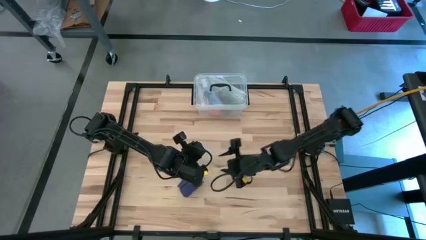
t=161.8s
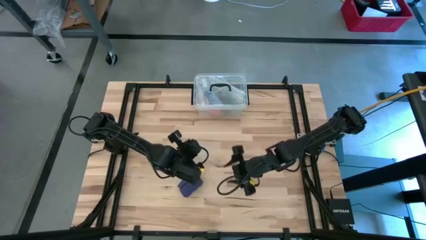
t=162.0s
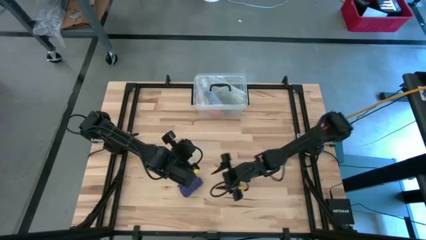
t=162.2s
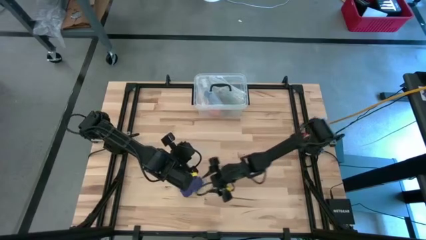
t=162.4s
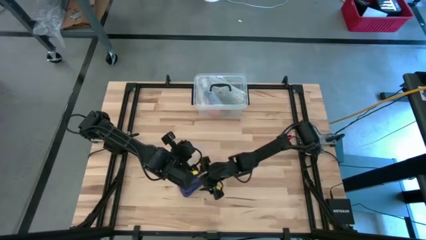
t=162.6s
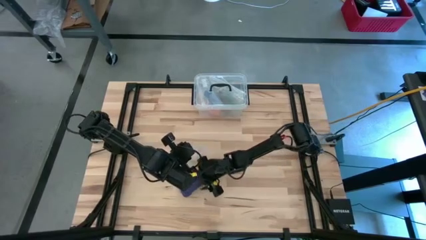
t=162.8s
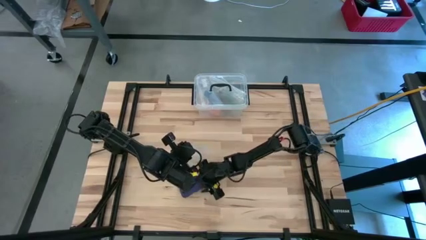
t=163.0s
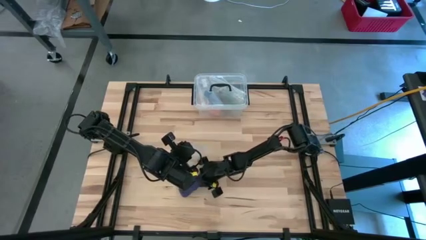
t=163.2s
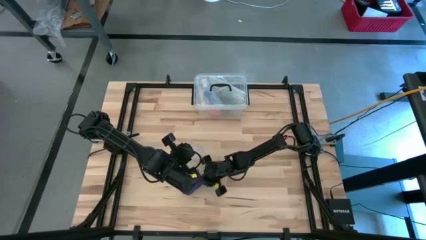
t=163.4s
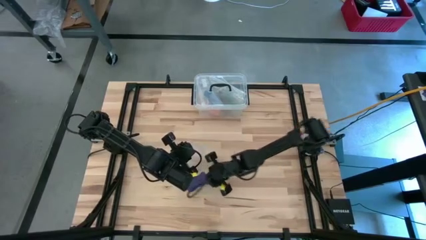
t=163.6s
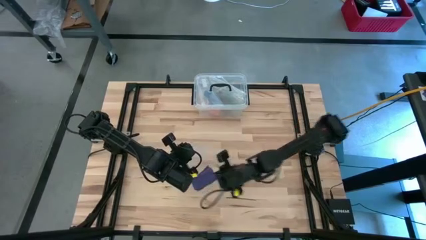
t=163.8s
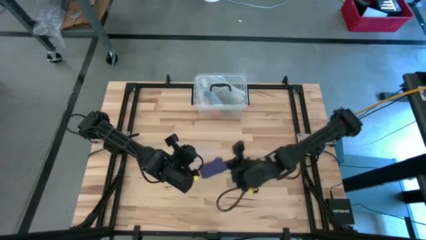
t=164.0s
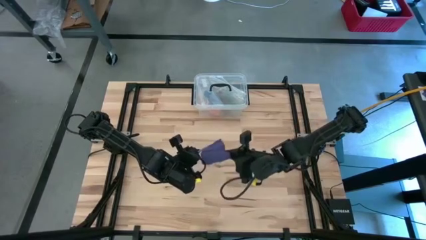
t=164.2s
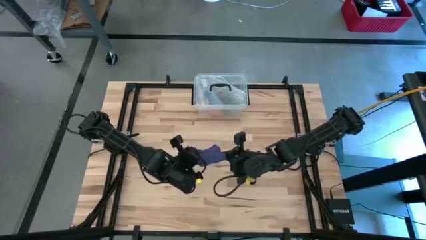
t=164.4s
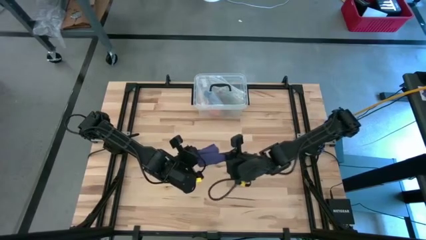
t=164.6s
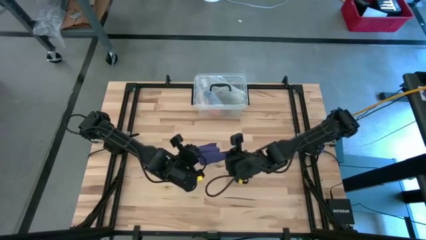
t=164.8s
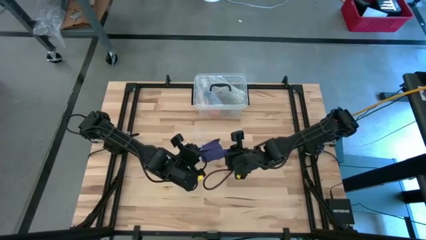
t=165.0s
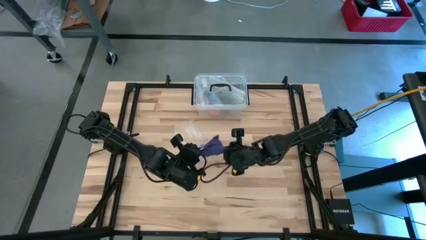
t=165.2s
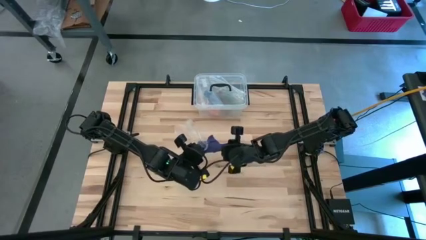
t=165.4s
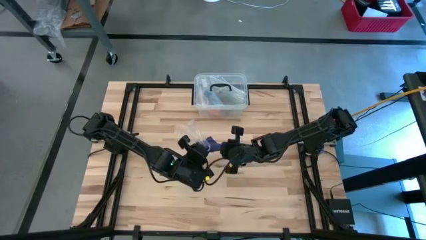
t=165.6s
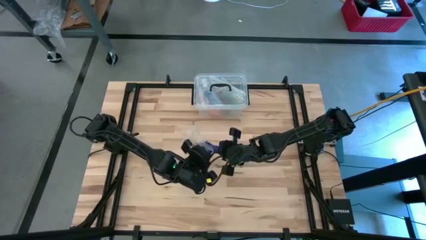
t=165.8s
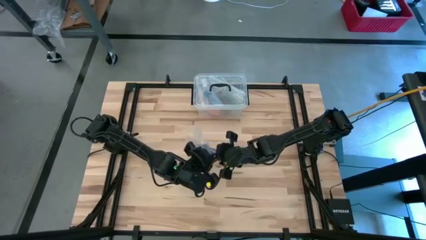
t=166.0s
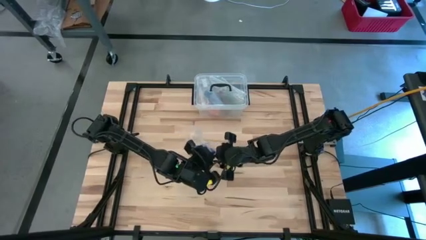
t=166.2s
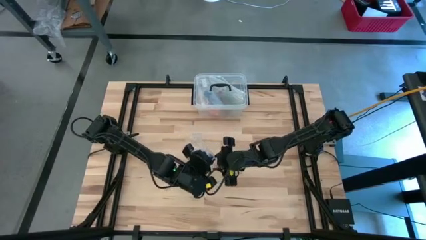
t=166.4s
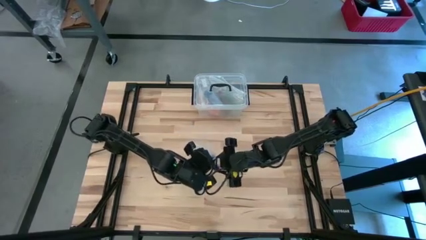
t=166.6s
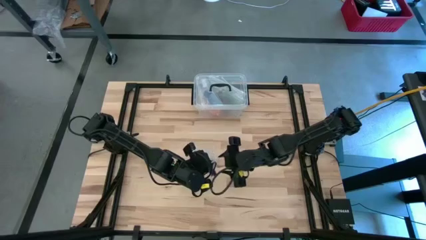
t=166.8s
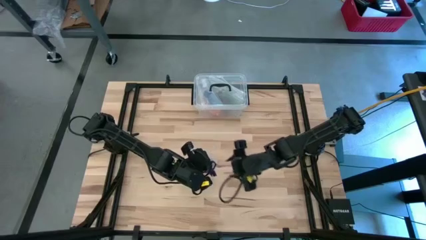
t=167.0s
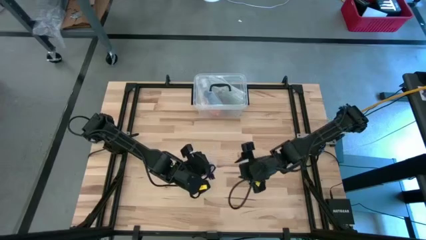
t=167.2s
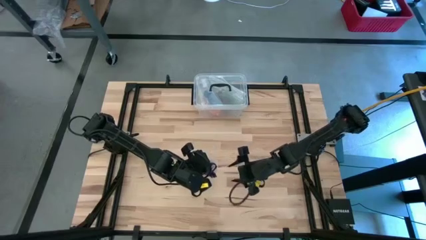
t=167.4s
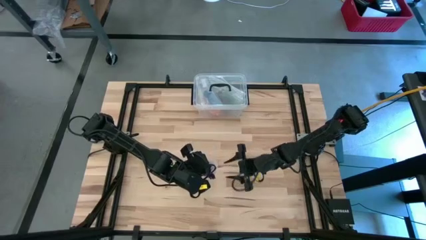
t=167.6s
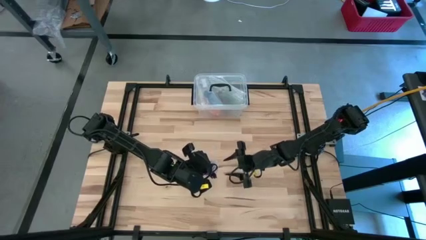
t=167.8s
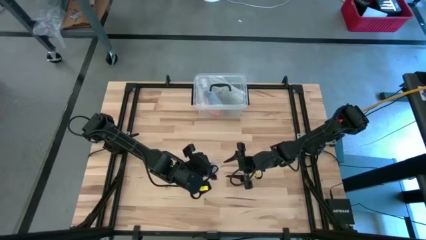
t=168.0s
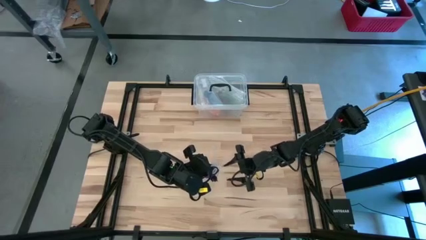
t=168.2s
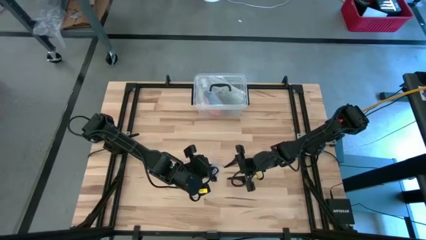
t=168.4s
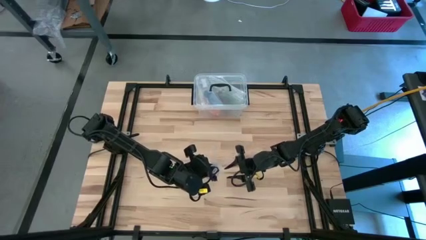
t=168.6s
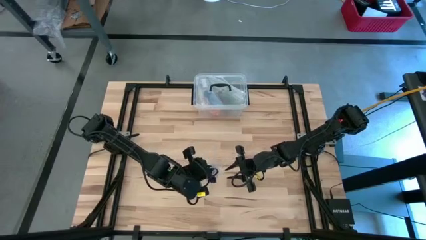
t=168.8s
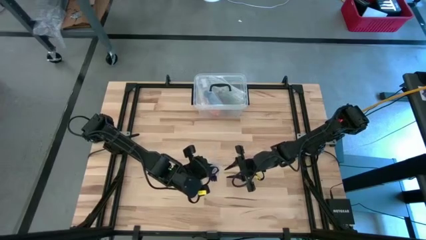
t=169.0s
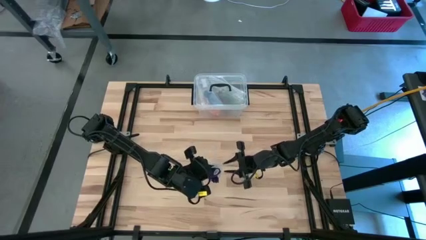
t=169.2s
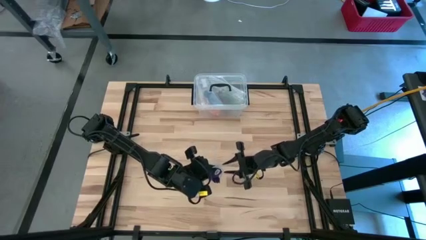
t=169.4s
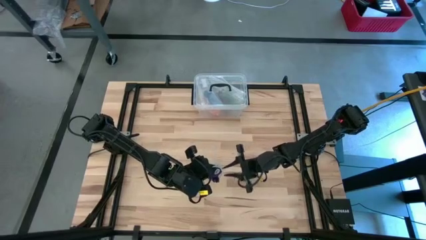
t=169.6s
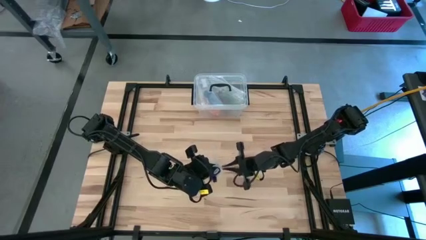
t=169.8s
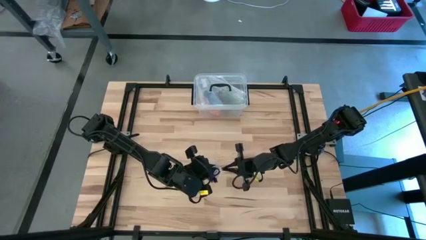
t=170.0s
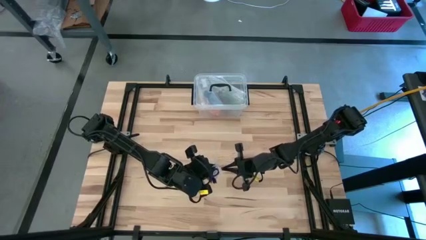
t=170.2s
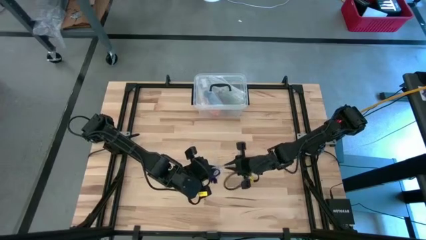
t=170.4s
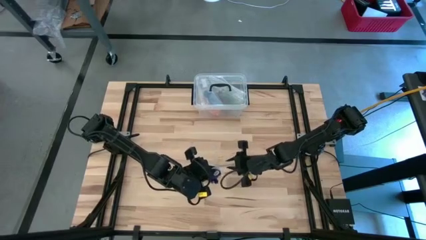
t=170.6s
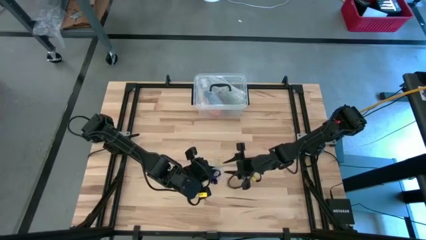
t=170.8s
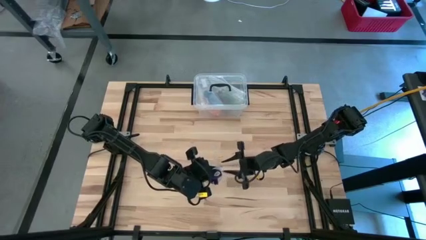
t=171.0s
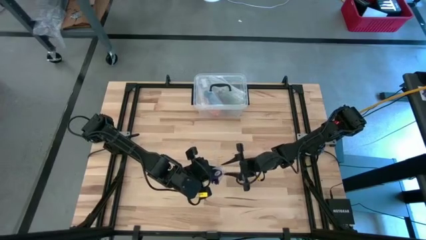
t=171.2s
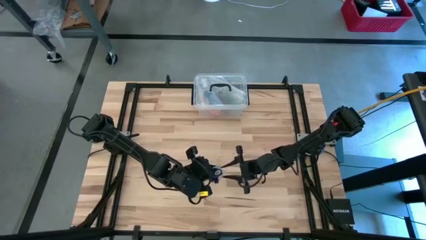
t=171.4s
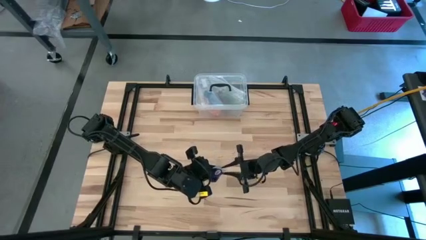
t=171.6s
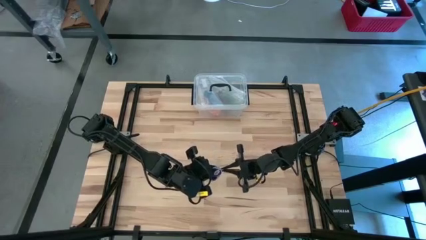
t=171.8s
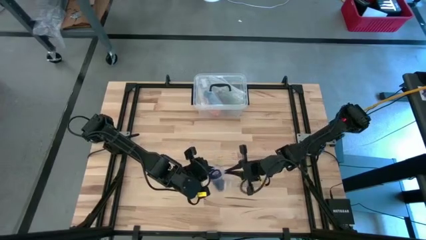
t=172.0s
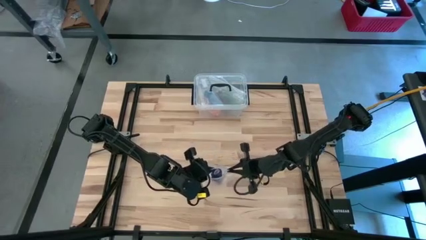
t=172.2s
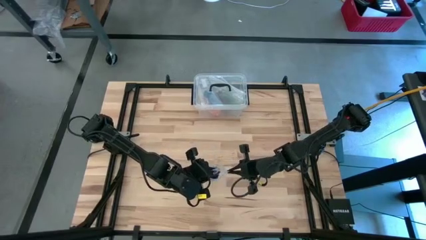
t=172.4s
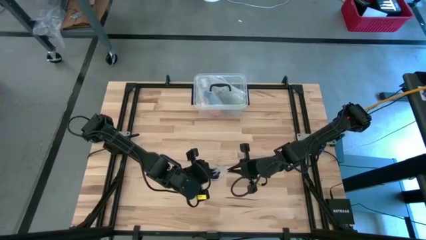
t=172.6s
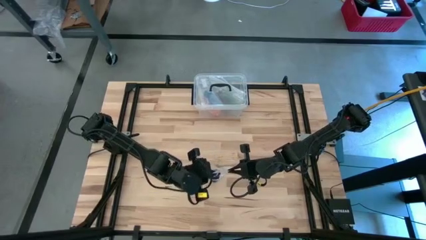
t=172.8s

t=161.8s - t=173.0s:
Task: Roll bandage
Put the blue bandage into the transparent zip bag

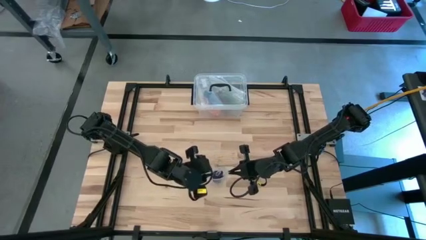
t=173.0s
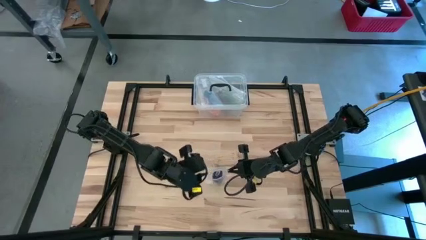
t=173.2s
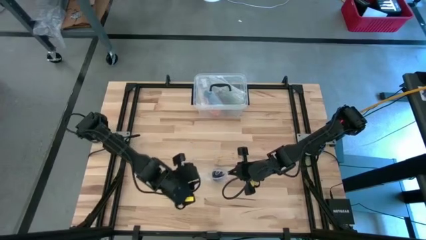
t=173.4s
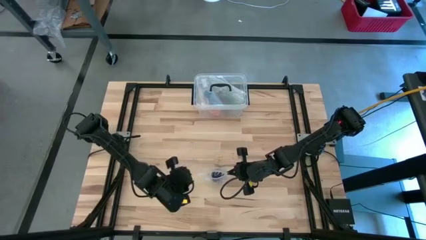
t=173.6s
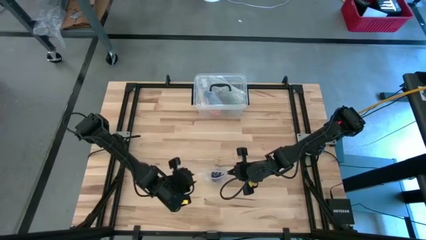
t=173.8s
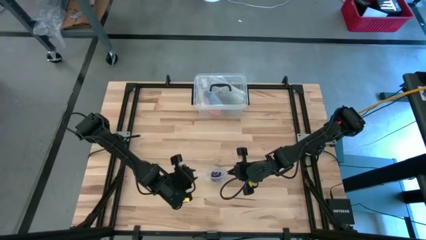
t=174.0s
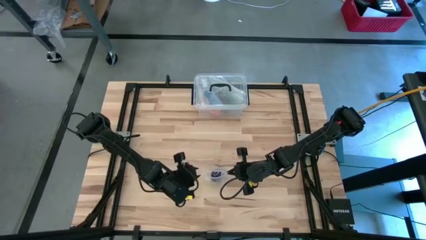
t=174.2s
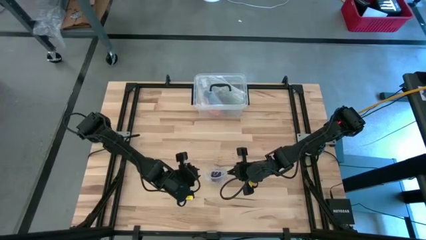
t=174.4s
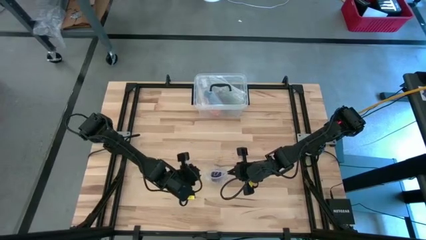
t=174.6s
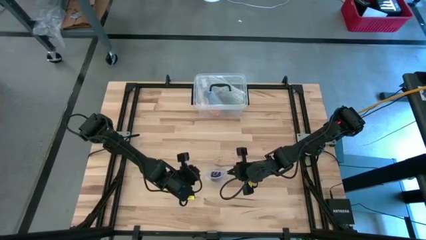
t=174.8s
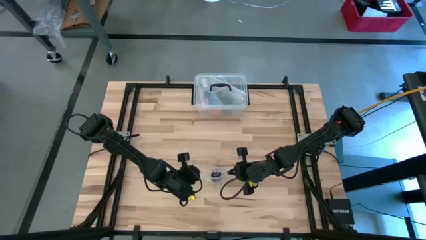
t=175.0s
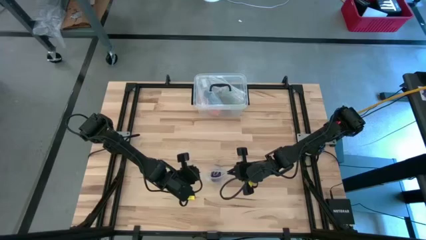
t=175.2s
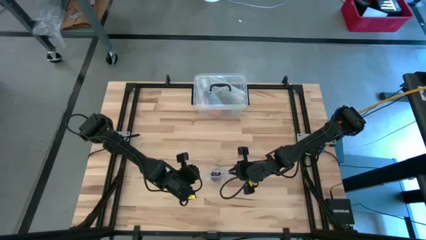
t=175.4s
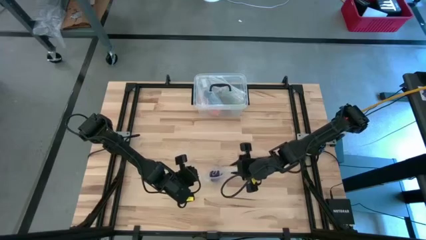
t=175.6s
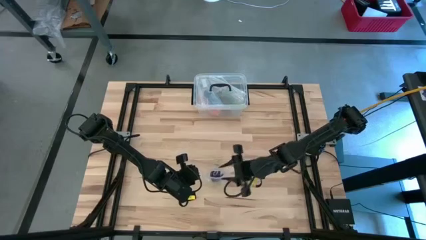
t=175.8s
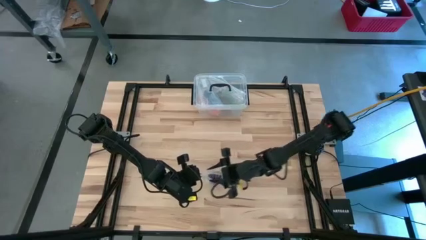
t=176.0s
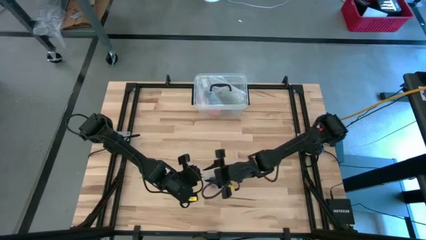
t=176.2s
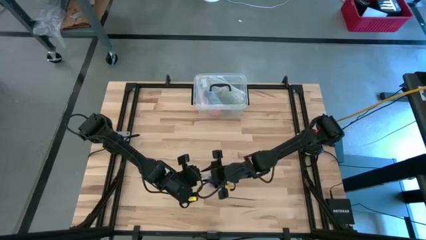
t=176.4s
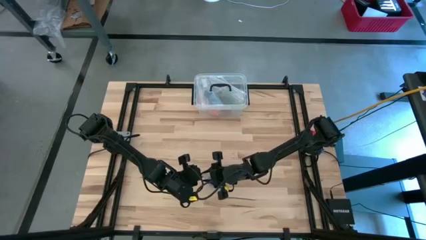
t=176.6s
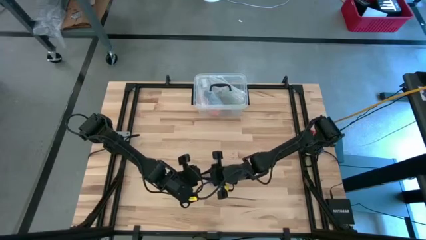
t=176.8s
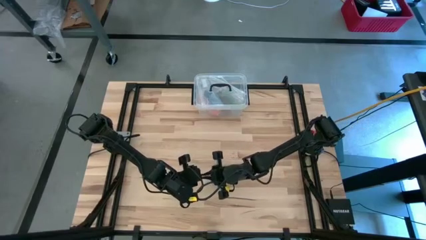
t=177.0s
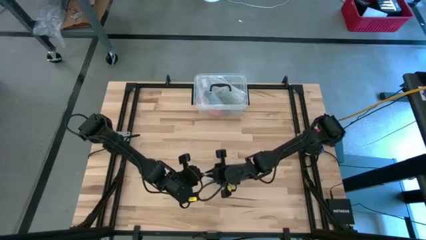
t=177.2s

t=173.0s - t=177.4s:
Close the transparent zip bag

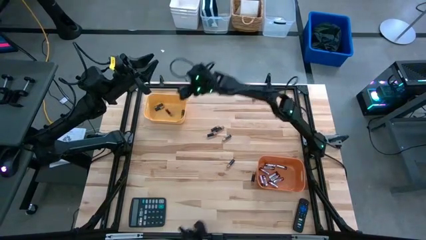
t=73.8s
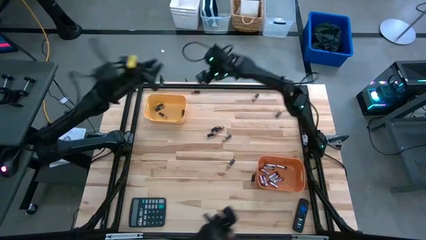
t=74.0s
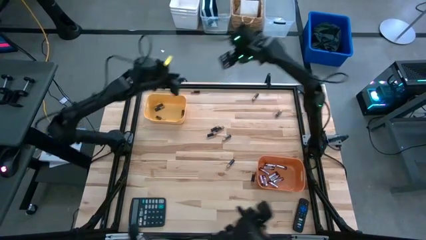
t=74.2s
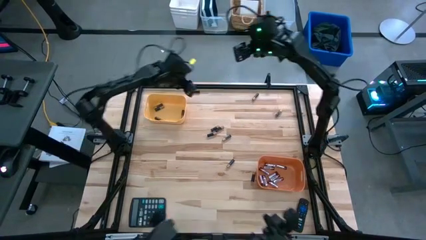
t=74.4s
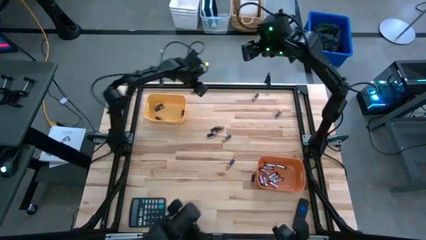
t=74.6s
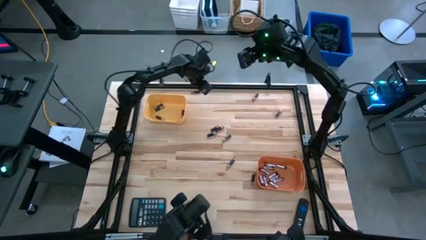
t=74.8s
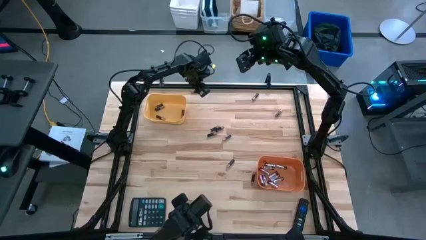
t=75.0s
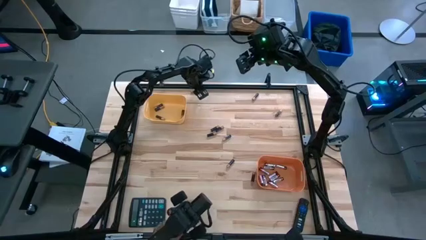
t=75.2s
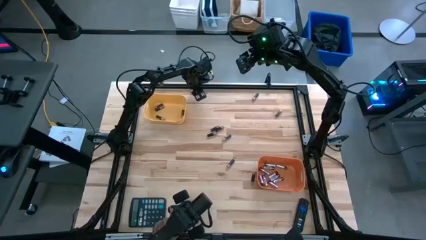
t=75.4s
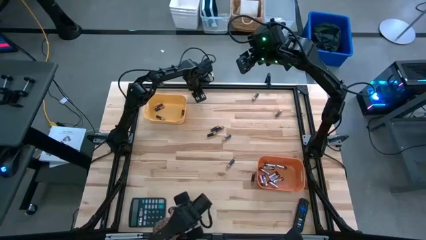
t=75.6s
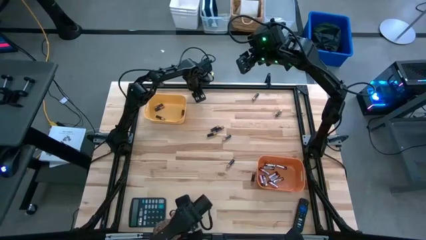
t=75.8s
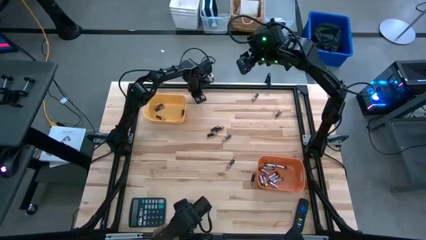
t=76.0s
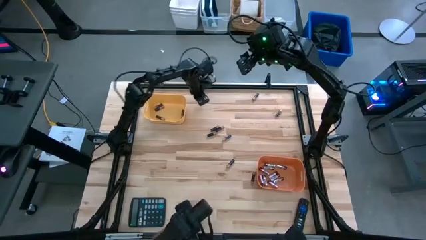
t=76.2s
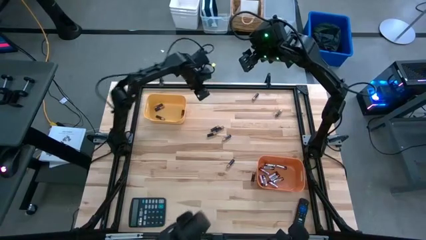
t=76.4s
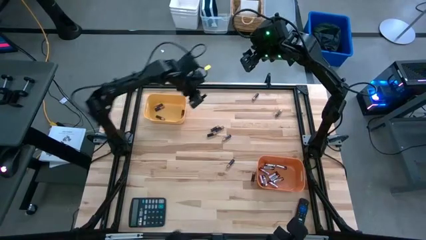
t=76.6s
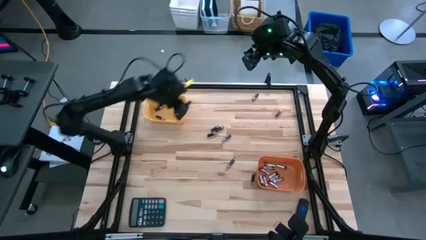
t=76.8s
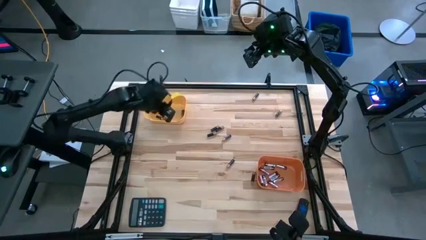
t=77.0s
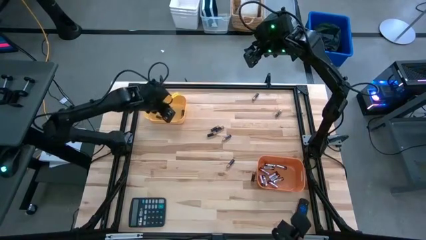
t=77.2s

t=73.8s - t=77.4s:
Task: Sort batteries
Put the black battery into the yellow bin
